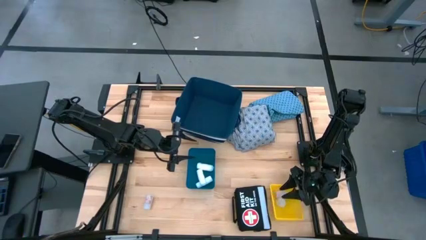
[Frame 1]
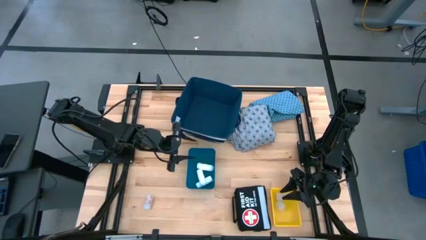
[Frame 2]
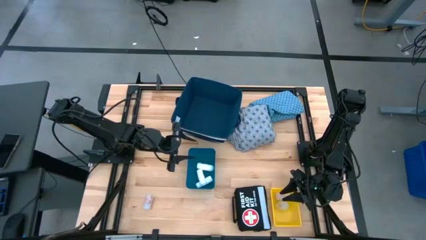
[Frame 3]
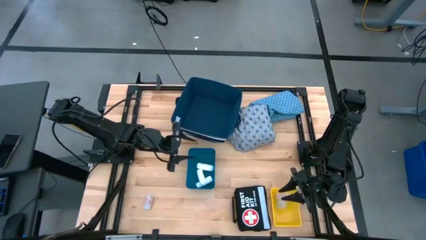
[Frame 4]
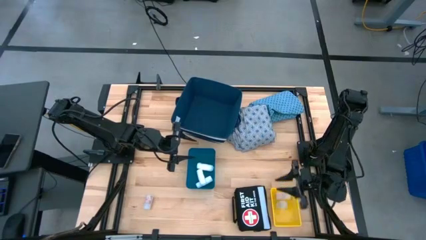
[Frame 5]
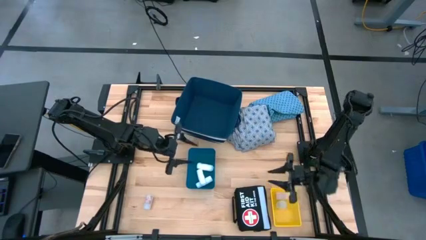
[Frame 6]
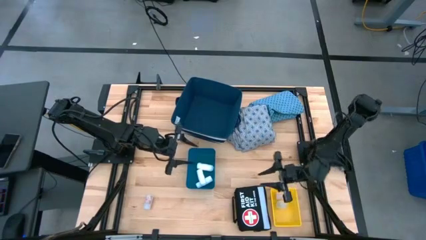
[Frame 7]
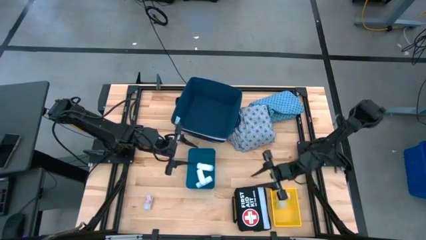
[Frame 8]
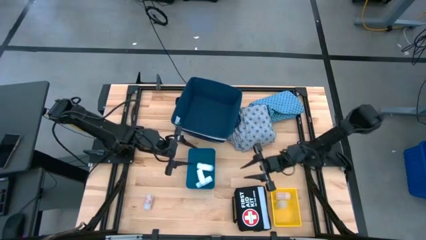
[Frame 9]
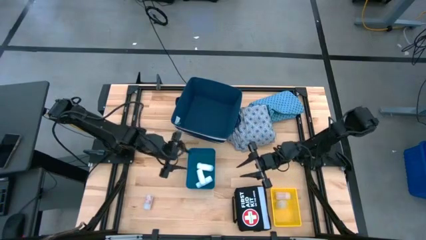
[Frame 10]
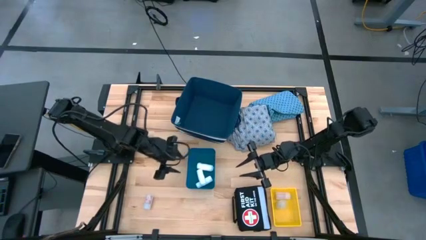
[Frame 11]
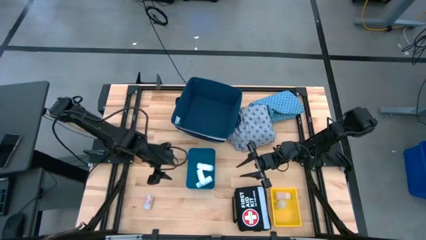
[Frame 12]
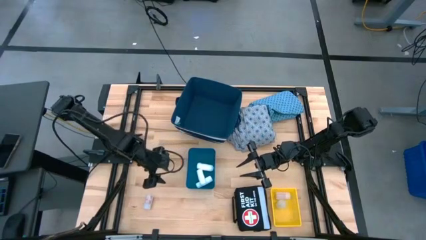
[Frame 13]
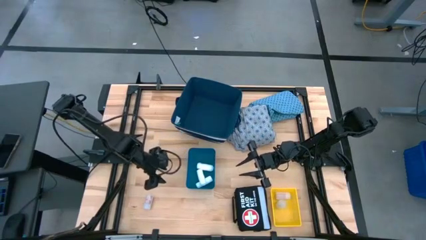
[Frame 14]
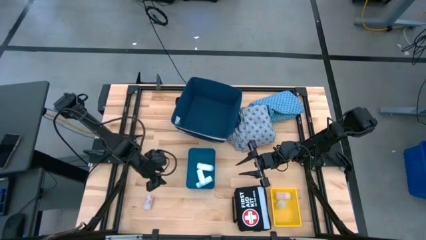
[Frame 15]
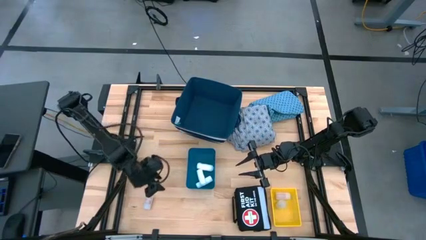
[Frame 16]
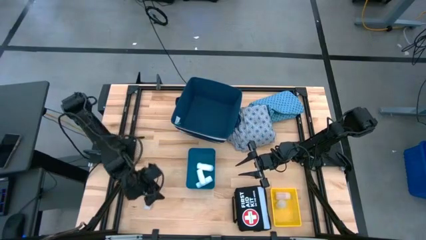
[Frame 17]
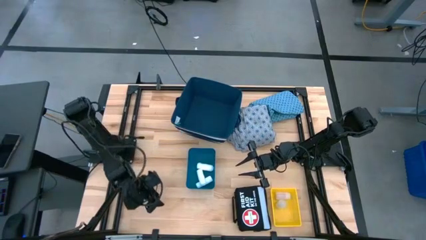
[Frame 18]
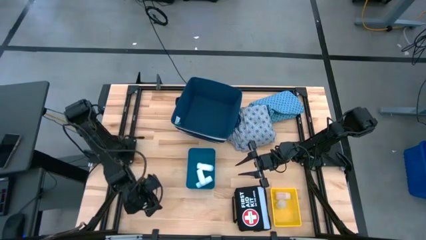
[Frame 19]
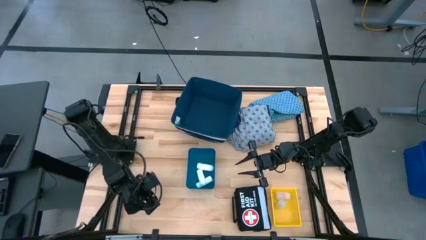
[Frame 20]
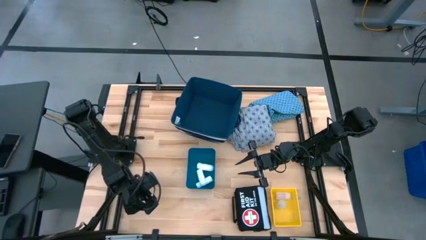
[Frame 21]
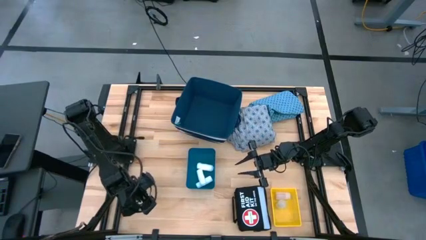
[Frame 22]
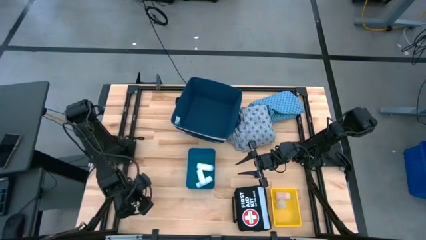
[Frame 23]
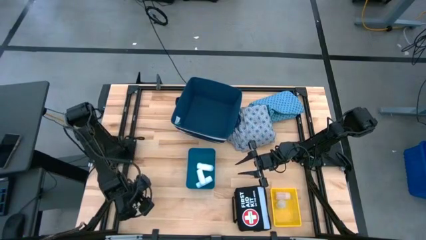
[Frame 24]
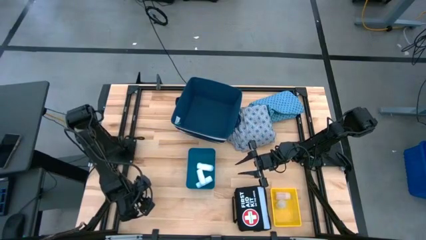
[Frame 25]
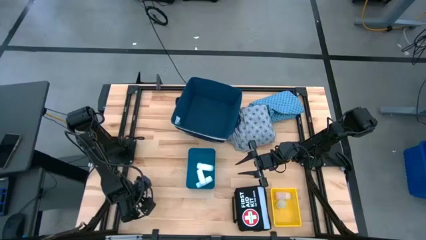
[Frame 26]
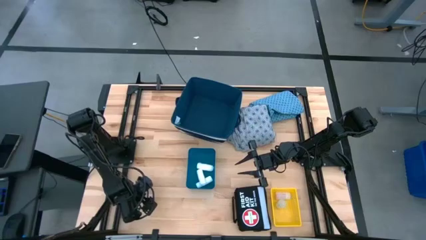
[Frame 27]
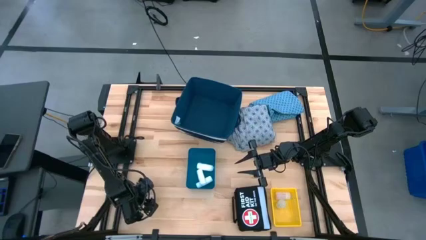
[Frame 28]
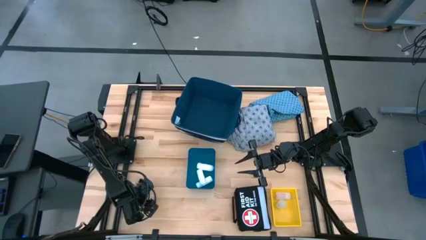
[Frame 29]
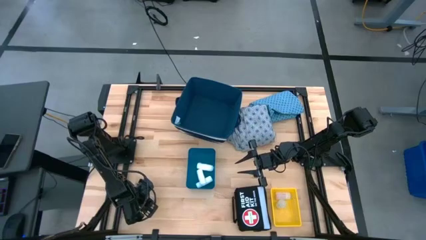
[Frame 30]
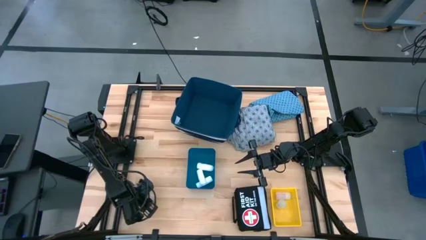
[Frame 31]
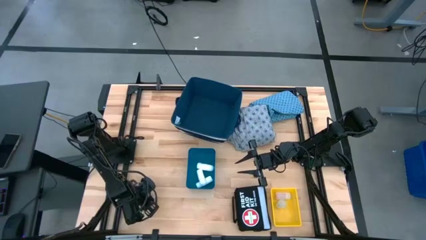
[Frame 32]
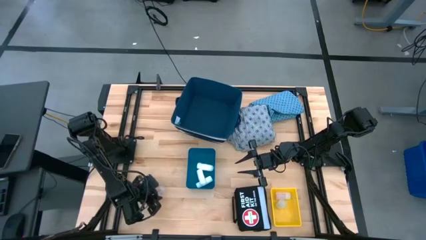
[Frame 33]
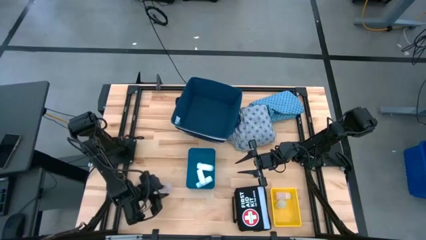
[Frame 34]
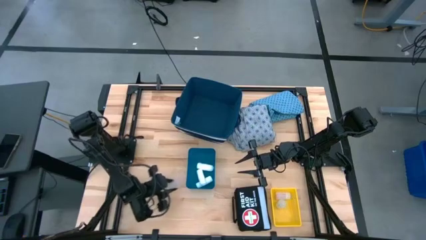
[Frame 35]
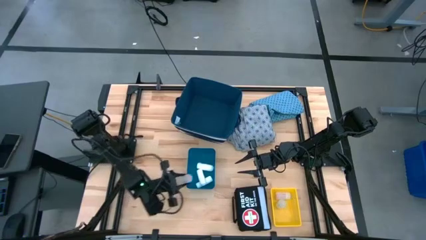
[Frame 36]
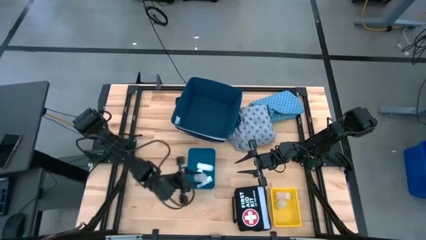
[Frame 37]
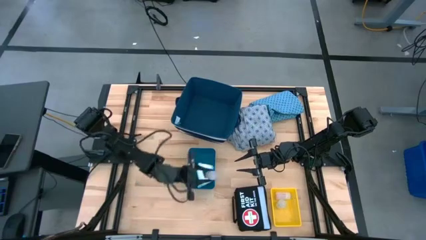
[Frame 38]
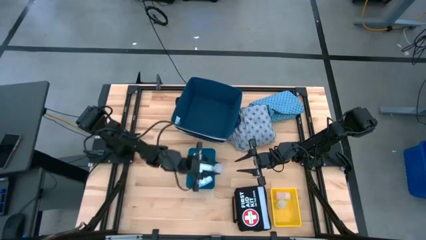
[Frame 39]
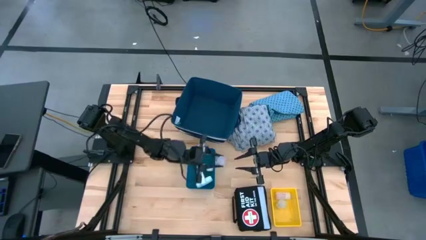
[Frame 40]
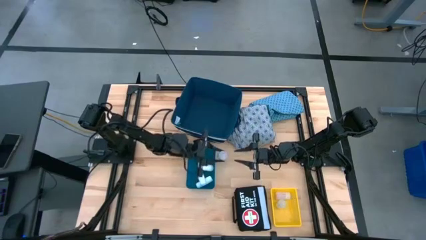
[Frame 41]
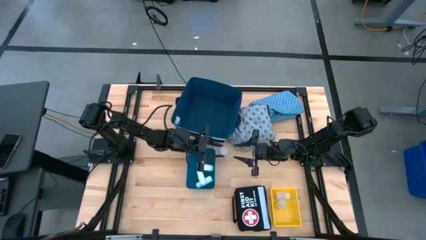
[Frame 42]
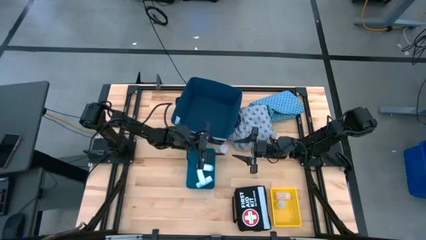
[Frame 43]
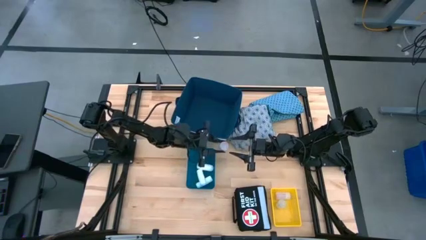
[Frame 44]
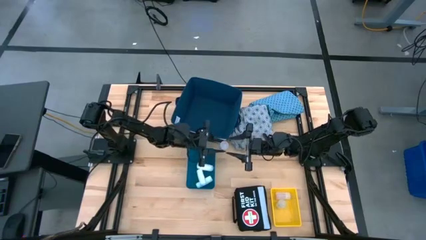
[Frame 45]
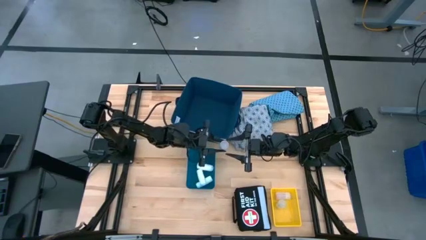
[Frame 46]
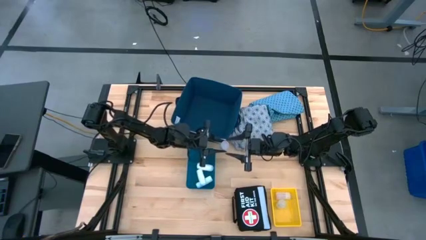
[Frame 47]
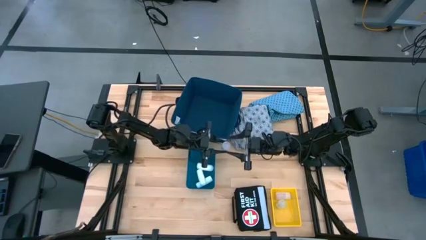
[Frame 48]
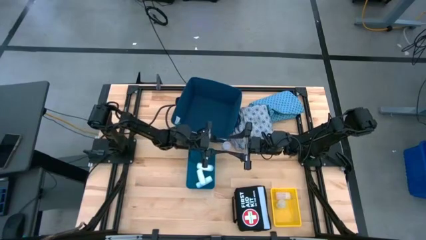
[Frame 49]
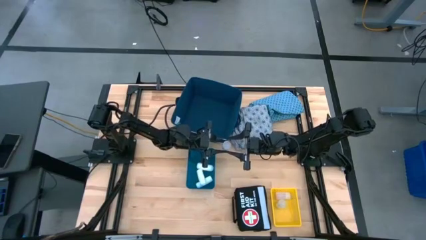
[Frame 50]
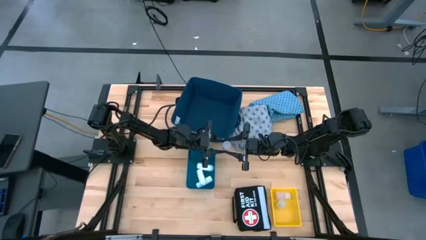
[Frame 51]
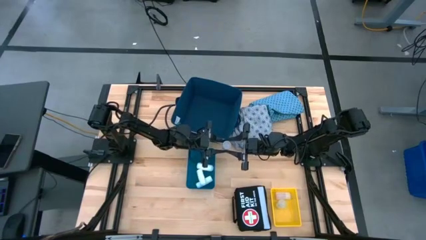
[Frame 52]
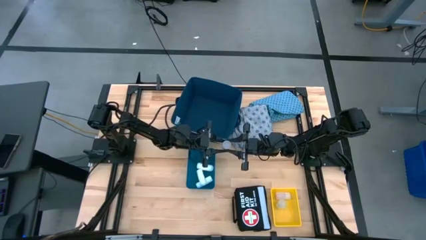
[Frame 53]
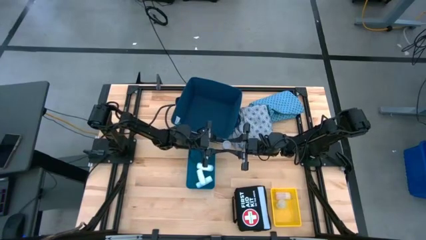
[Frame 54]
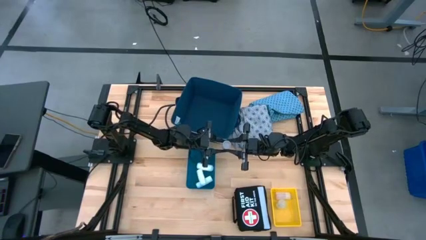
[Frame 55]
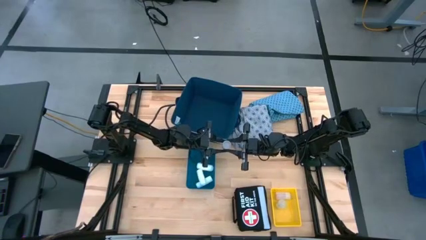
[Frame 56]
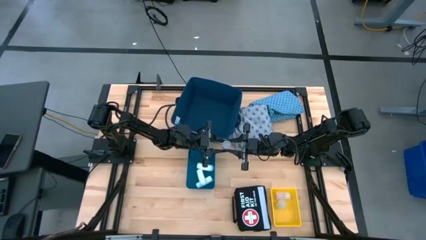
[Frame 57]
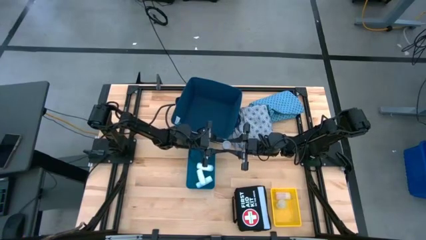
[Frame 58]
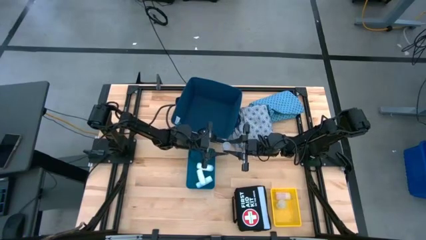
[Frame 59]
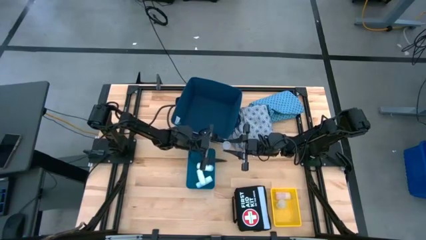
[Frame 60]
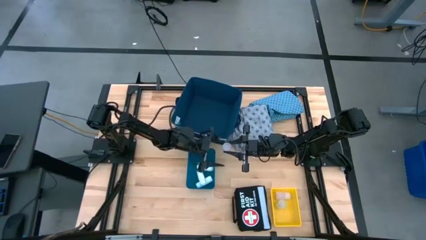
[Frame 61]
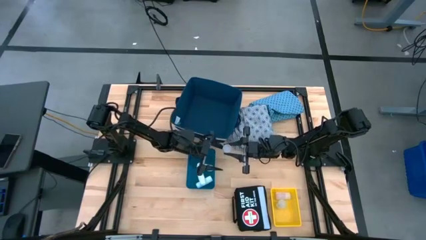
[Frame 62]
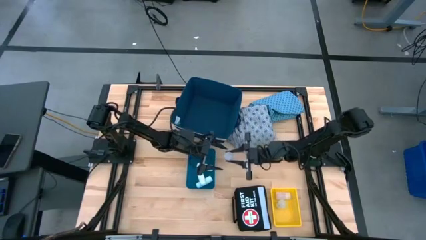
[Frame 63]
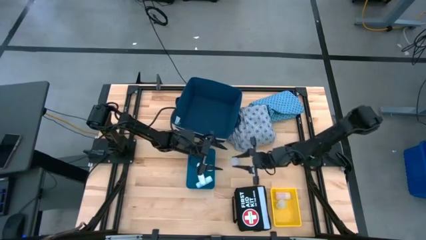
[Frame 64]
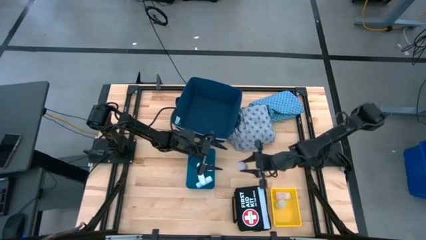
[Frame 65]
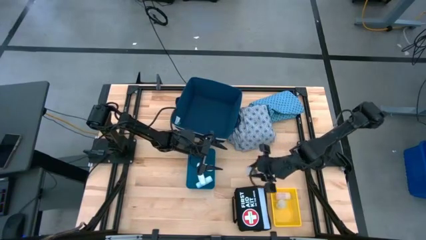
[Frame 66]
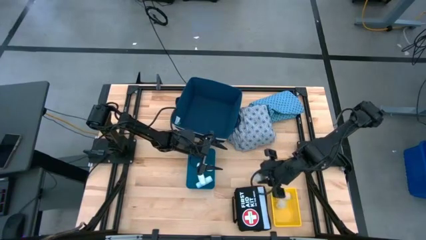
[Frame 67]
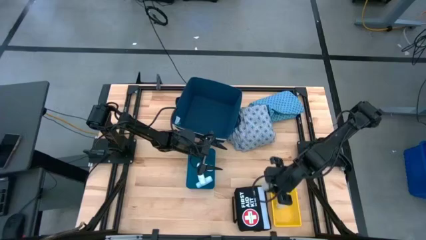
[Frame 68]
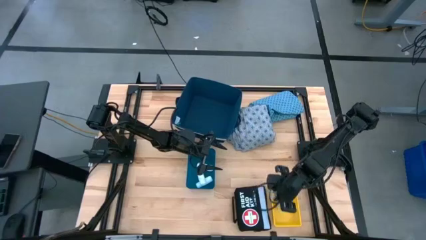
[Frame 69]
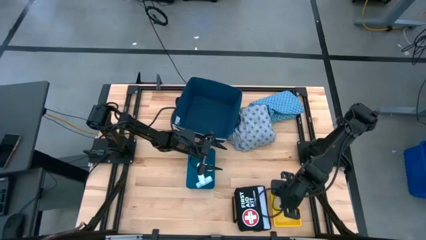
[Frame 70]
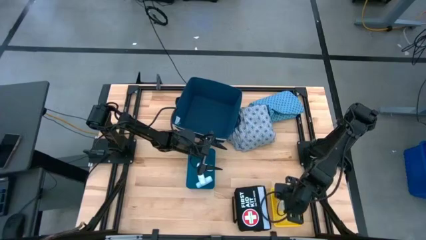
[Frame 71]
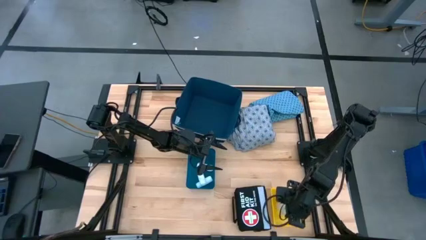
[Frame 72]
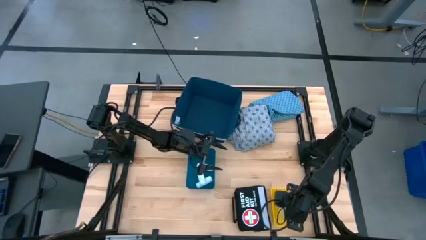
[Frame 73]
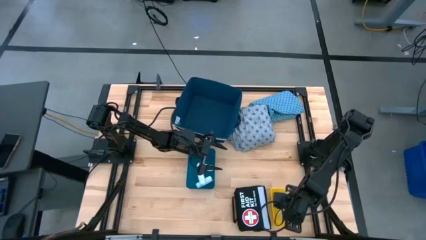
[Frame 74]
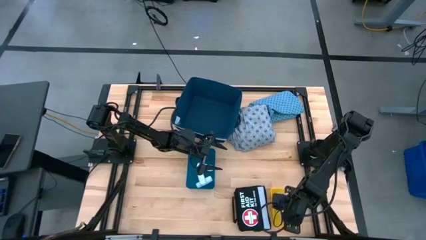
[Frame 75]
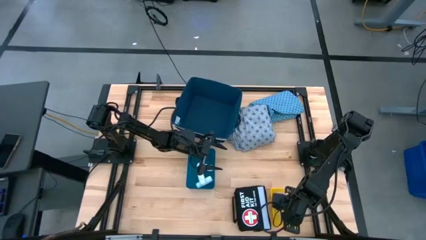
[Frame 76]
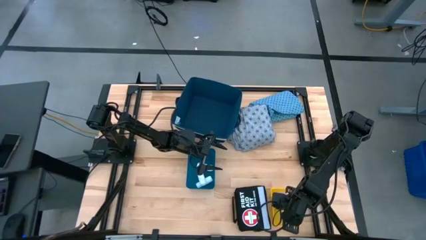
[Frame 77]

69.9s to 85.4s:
Task: Pick & place medical supplies in basket/bin
Put the transparent bottle in the yellow bin
